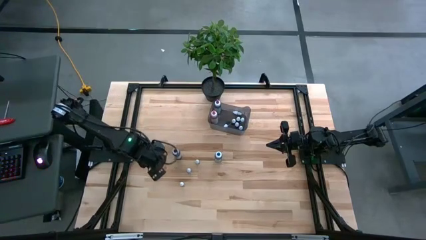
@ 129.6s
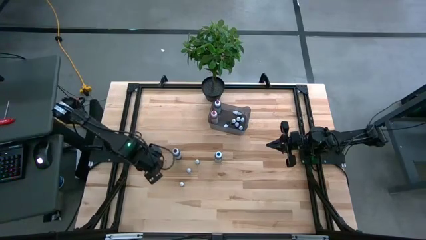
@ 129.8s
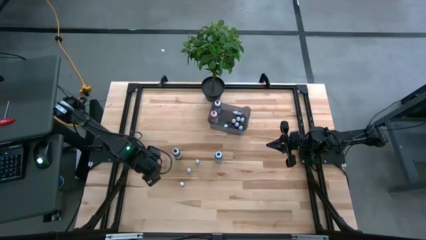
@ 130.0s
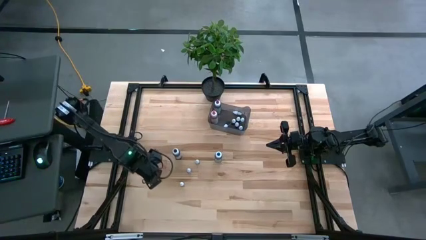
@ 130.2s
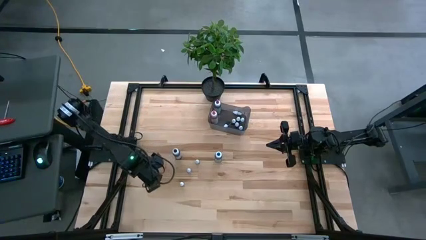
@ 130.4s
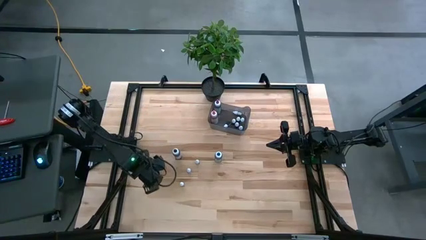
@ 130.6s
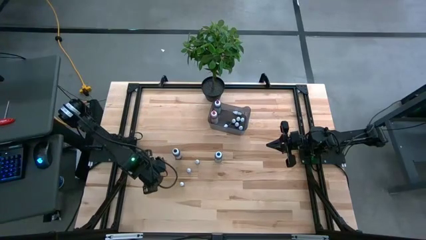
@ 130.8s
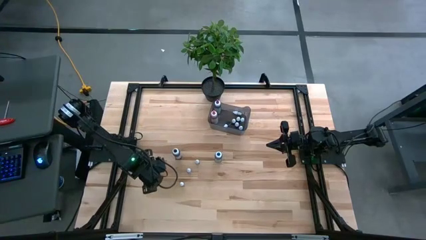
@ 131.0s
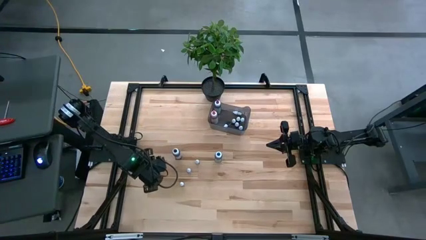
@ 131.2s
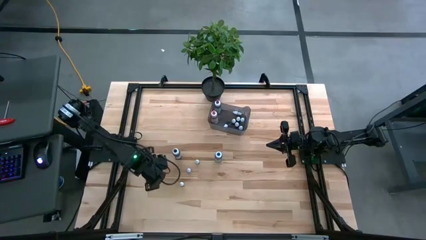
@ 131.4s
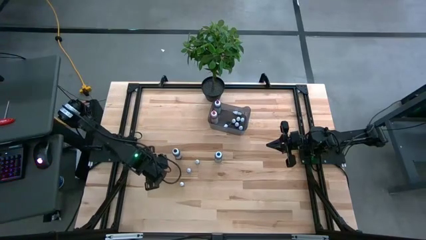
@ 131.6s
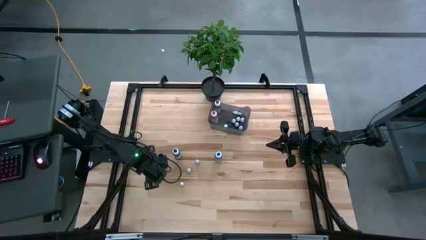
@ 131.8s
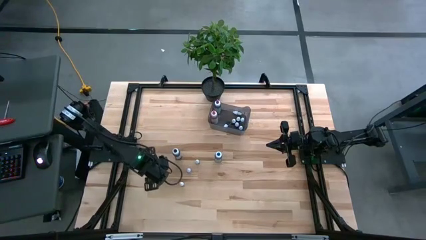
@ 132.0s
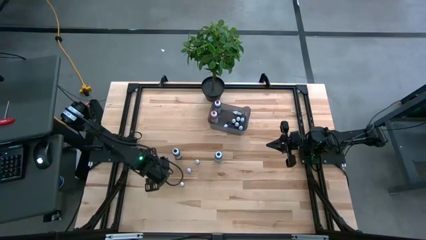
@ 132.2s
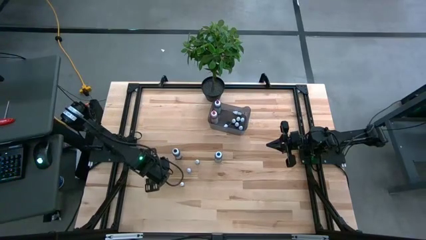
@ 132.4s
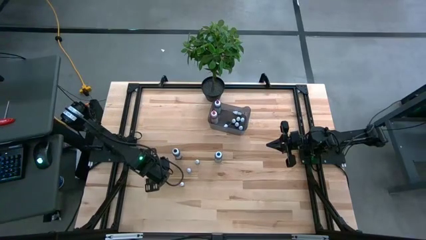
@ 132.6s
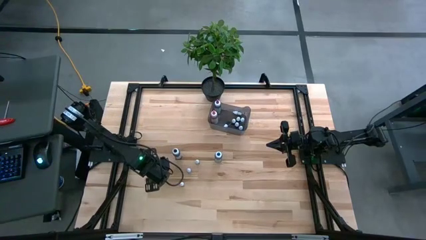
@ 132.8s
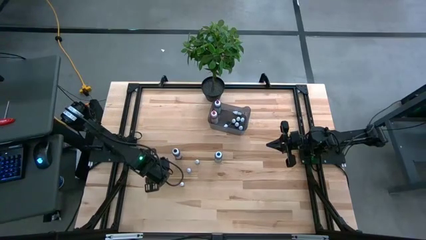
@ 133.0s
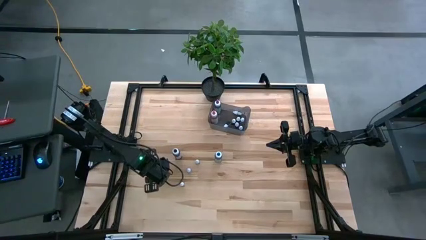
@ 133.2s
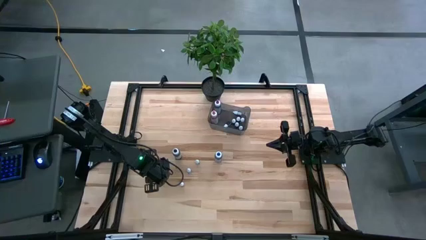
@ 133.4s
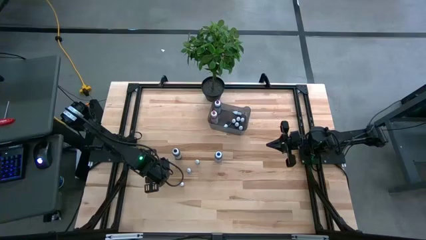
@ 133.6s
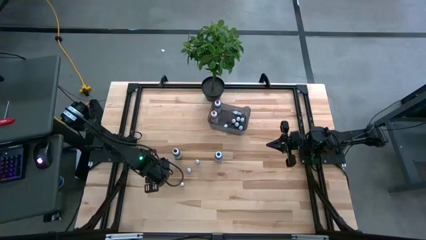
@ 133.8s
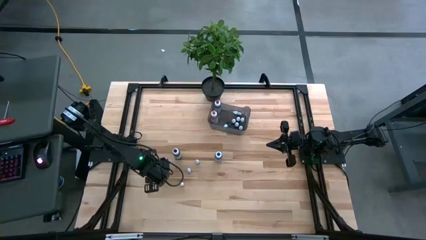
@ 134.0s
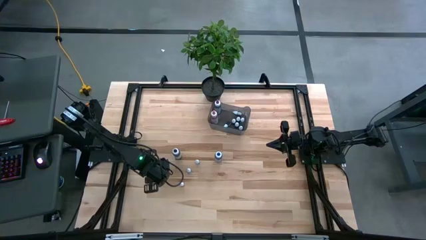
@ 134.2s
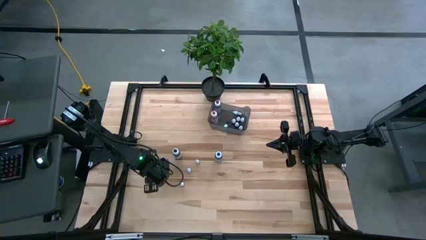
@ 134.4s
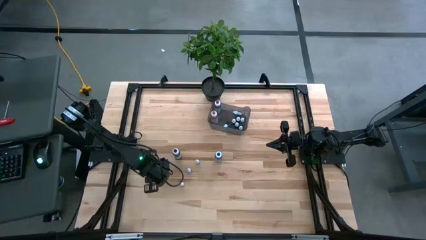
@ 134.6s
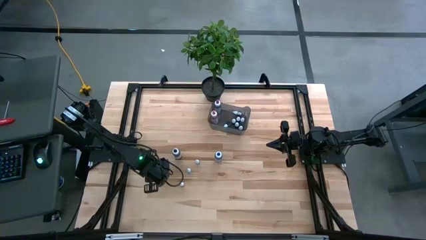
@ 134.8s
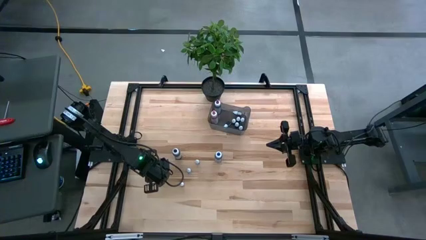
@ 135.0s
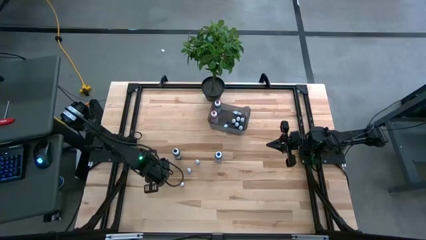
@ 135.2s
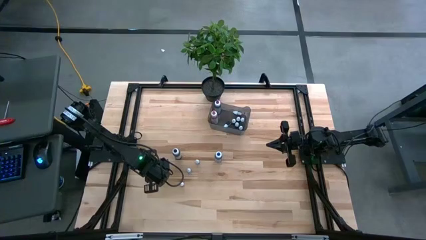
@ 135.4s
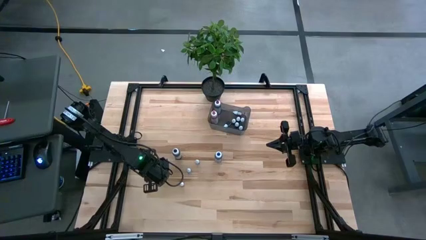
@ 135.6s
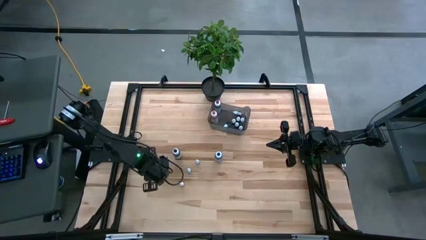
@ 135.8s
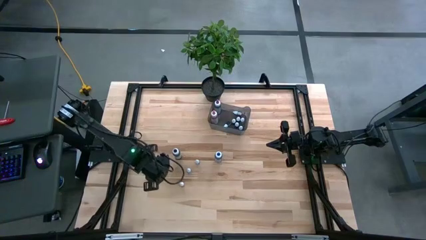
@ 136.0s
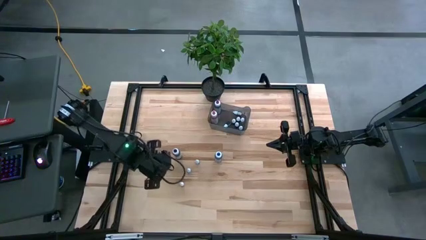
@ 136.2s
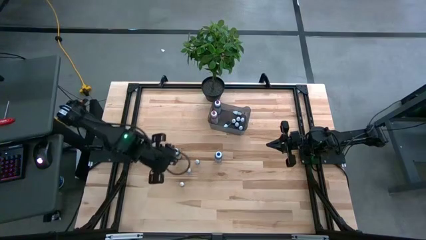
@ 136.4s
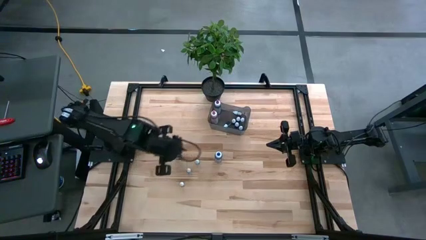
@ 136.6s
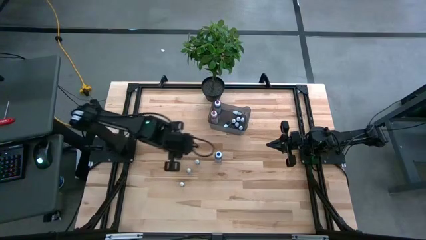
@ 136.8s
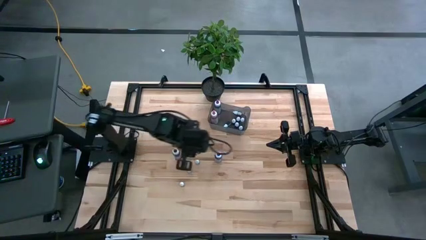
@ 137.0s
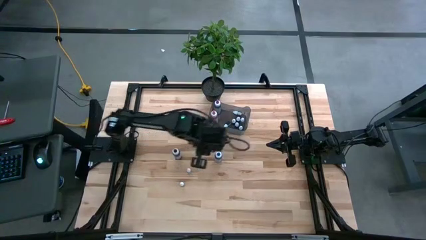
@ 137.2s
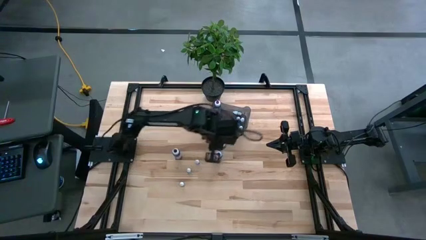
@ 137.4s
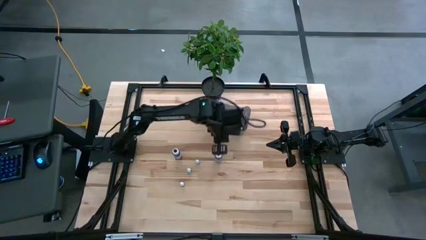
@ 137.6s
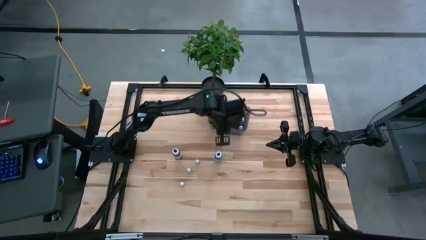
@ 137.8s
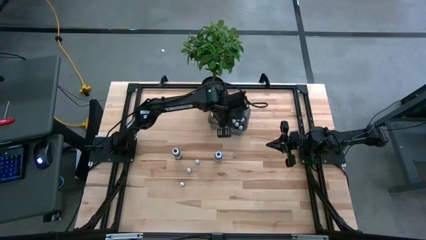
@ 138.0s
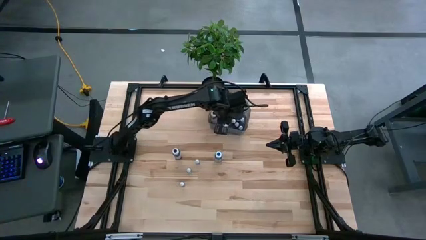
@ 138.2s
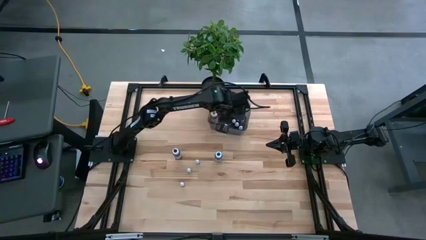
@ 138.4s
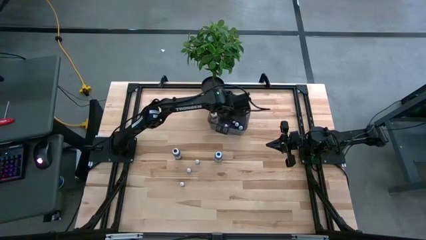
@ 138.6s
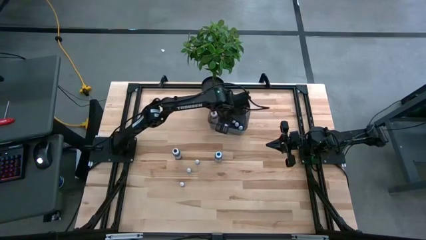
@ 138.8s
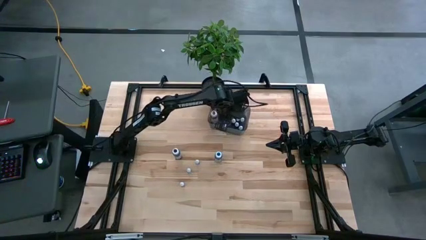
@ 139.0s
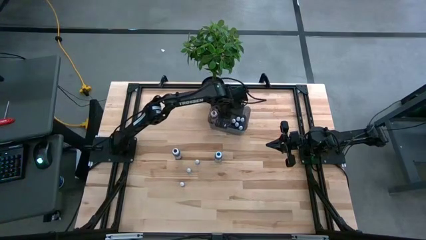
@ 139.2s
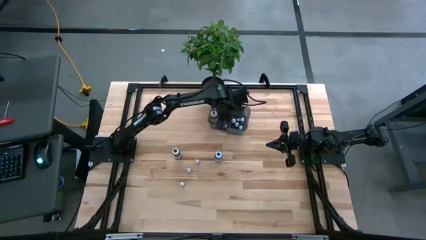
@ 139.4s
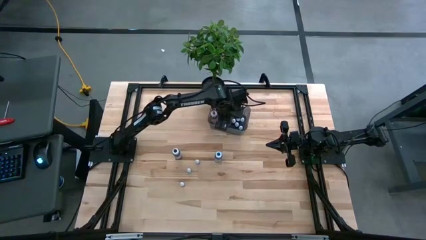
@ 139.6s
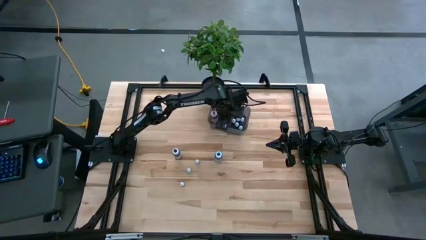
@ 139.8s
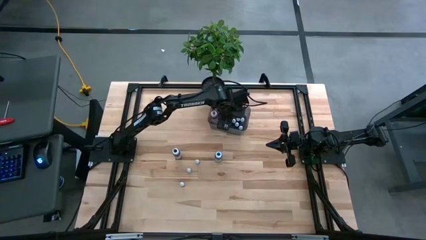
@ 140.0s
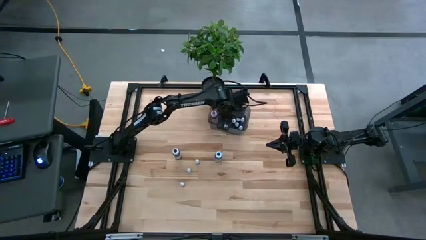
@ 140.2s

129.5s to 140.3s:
Task: Pick & Place food coloring
Put the small red food coloring bottle into the black bin

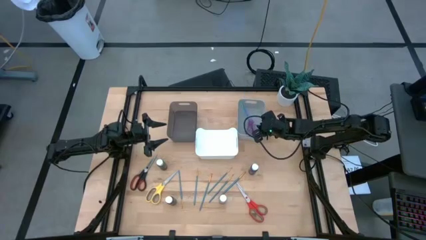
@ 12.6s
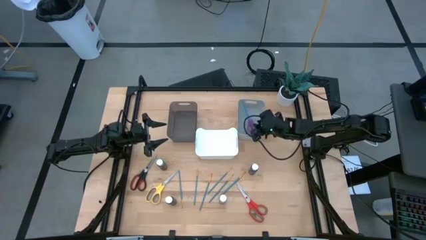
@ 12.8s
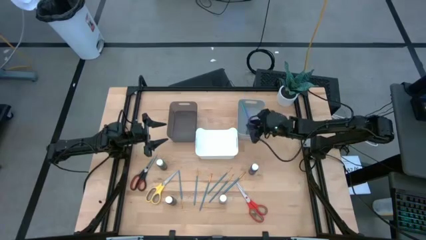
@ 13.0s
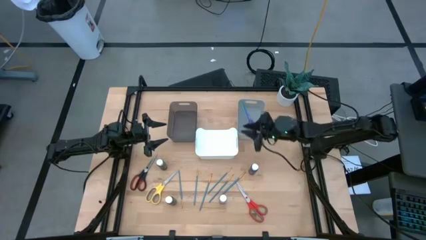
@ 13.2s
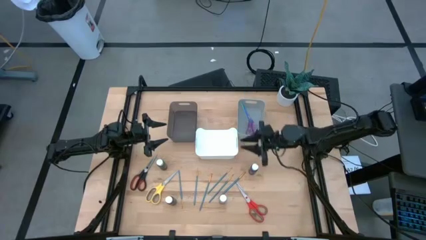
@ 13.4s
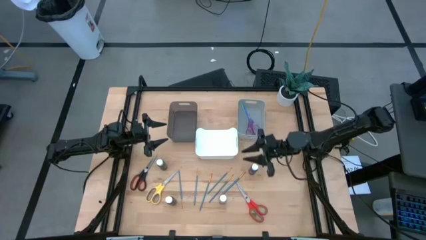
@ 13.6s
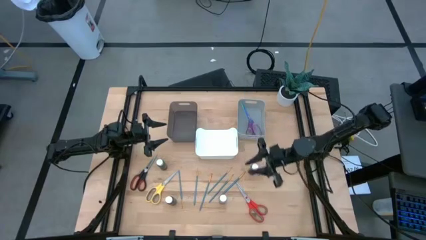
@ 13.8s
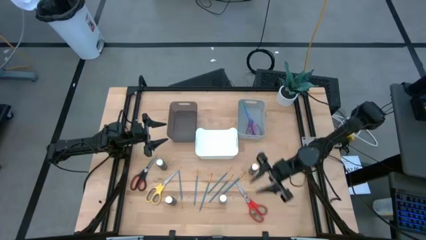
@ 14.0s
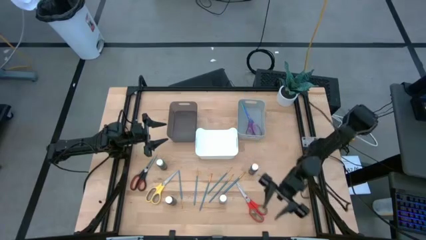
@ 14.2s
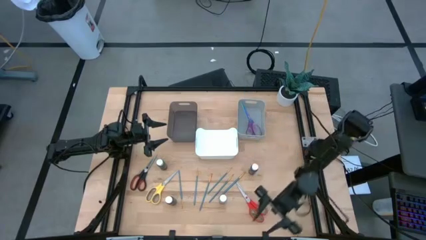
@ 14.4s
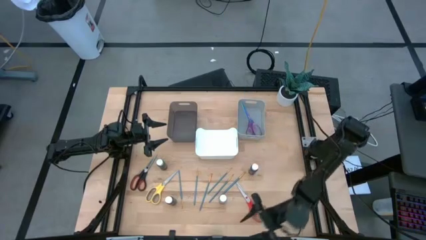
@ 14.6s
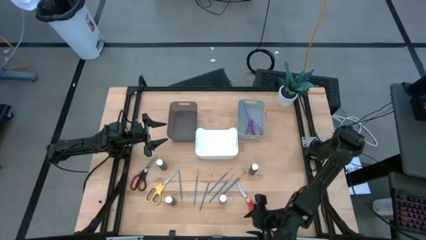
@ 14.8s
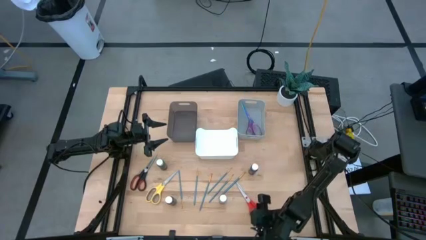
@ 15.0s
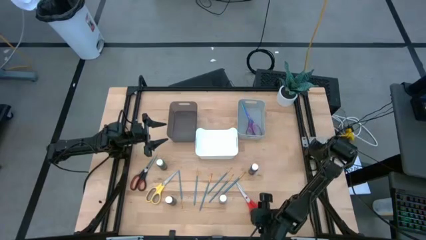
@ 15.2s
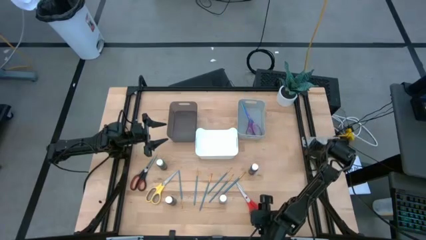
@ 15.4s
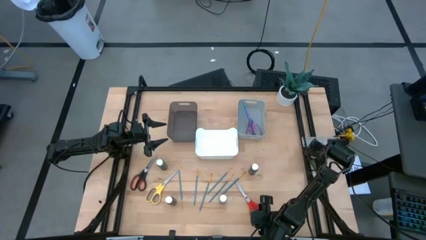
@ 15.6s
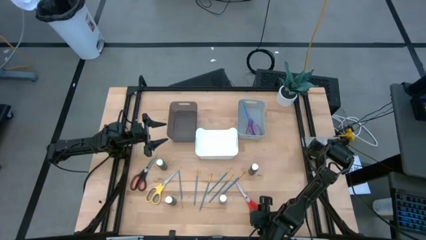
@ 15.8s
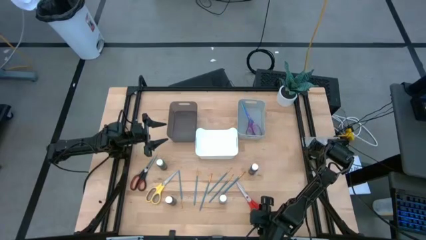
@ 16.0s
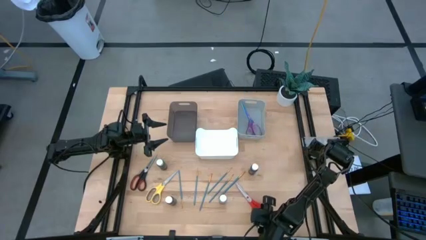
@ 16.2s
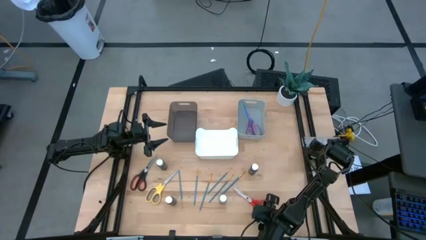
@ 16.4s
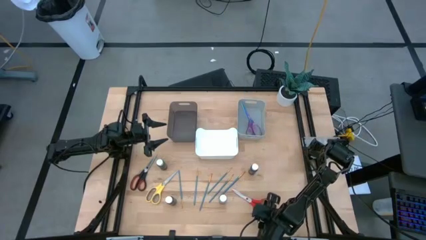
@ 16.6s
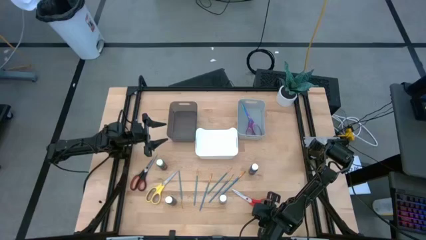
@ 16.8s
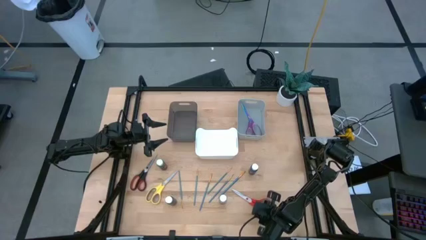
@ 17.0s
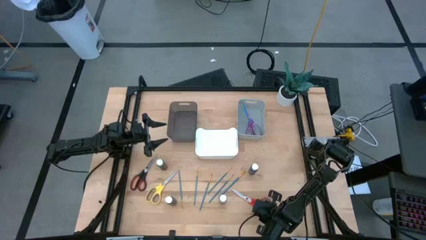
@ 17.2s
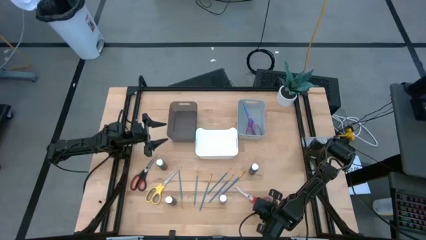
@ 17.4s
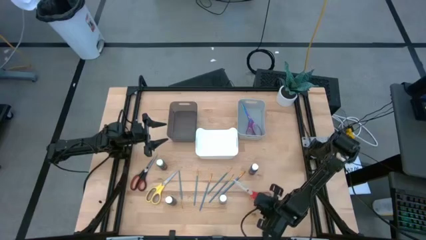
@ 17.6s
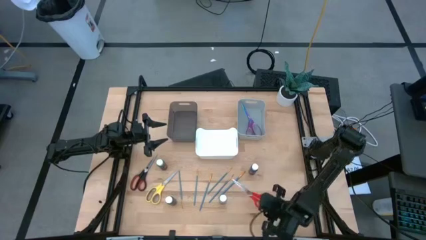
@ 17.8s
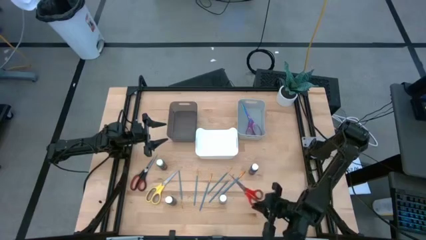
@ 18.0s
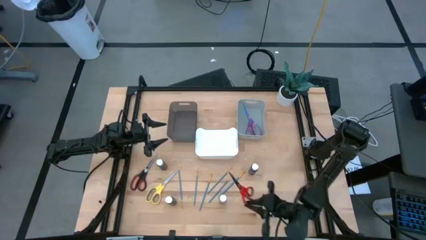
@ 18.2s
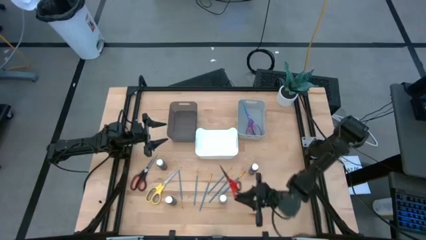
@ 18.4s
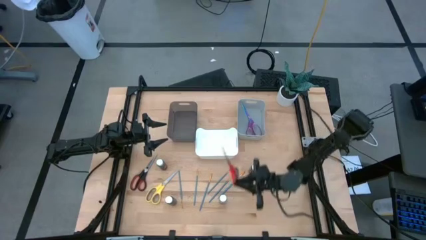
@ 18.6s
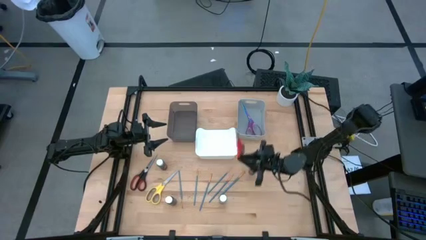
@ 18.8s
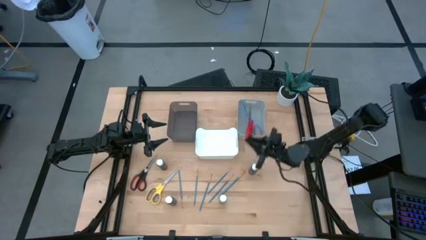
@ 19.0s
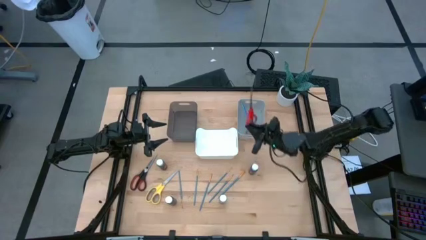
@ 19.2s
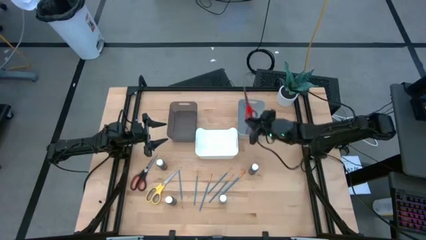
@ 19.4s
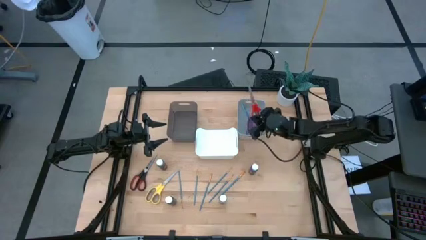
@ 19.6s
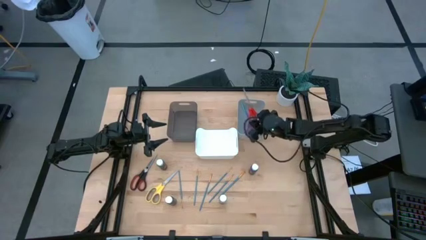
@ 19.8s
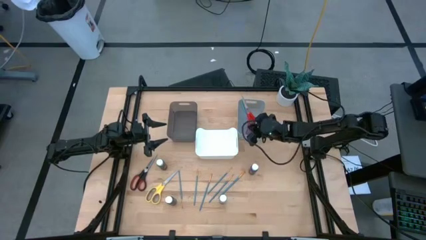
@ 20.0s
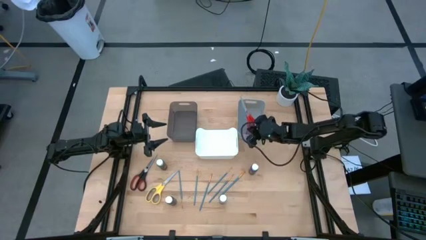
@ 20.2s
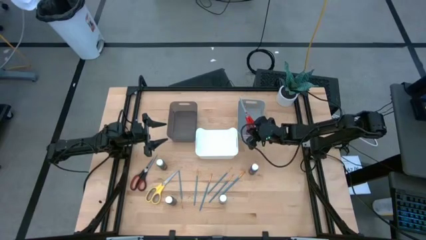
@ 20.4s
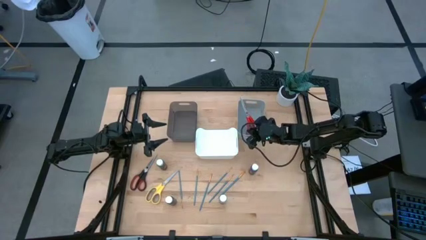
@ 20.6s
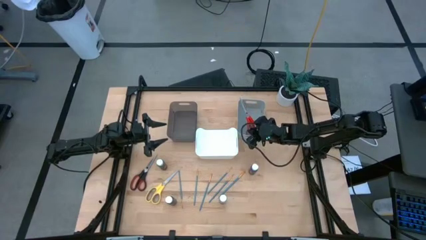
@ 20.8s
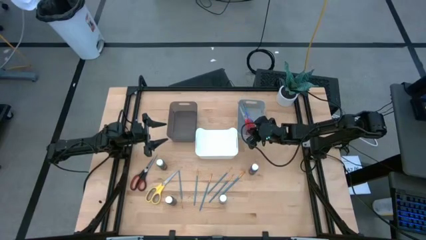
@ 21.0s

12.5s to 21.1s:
Task: Pick & Place Paint Supplies
Put the red scissors into the gray bin
